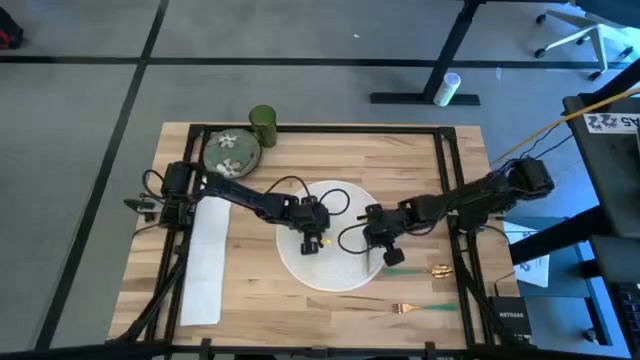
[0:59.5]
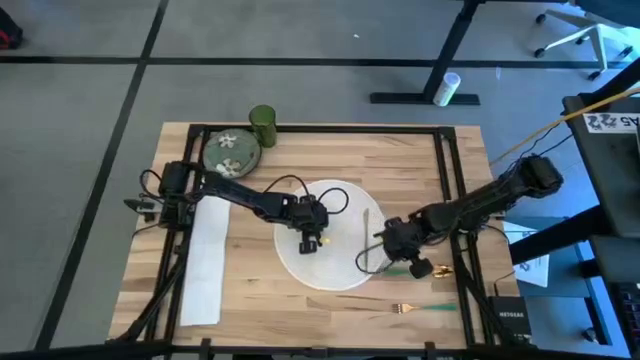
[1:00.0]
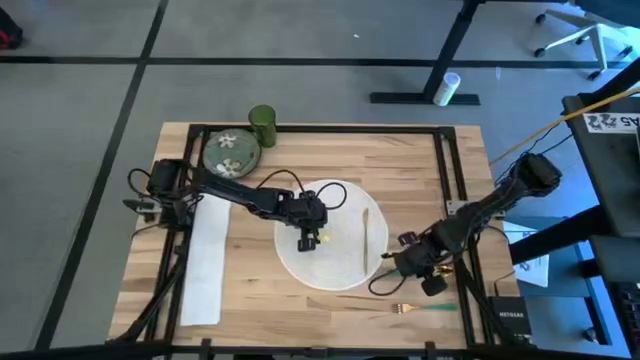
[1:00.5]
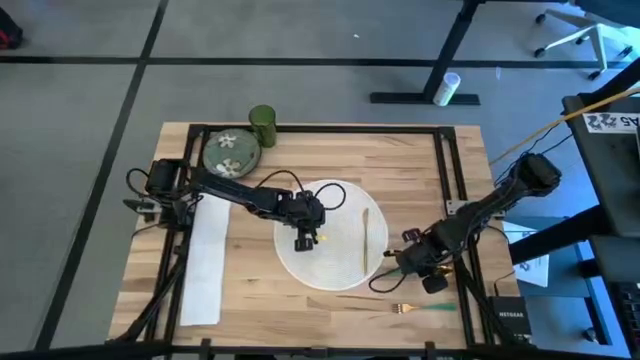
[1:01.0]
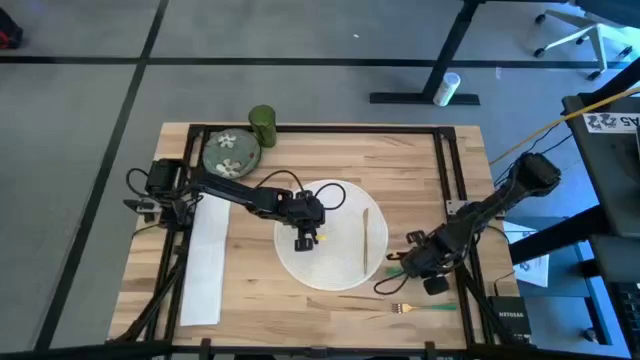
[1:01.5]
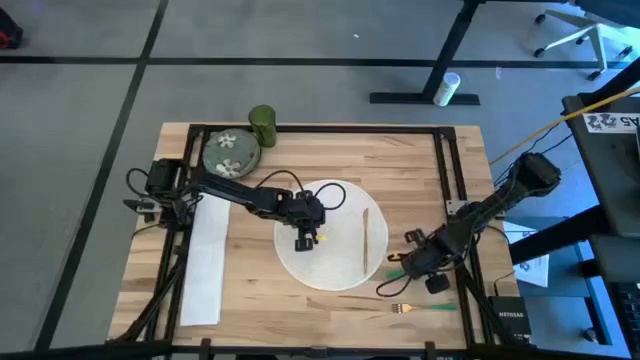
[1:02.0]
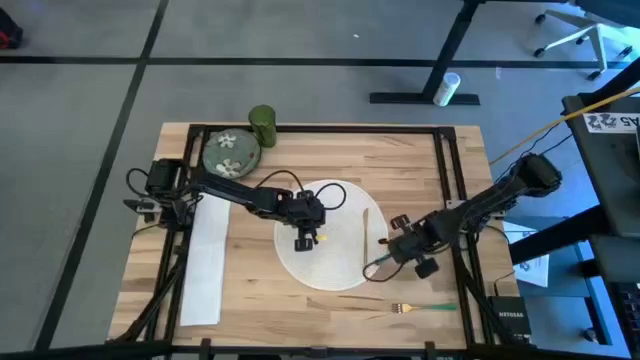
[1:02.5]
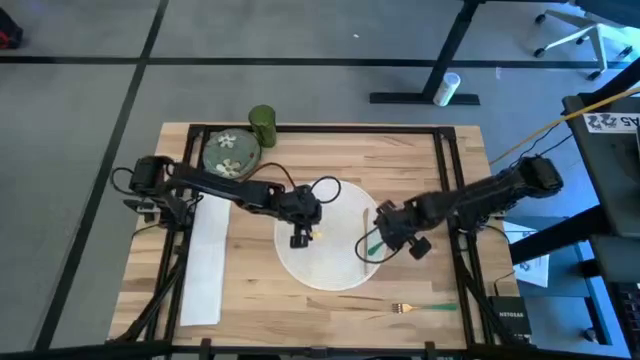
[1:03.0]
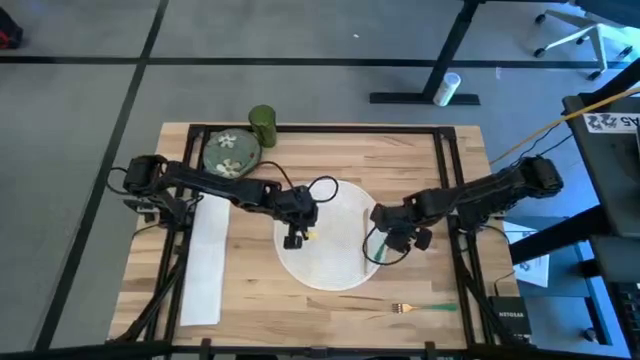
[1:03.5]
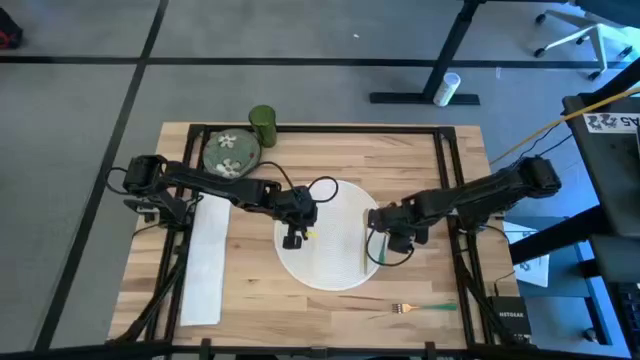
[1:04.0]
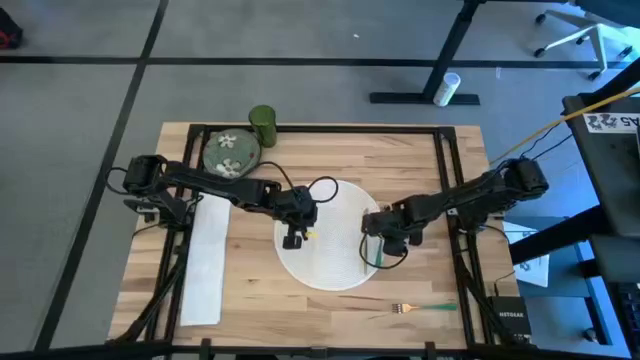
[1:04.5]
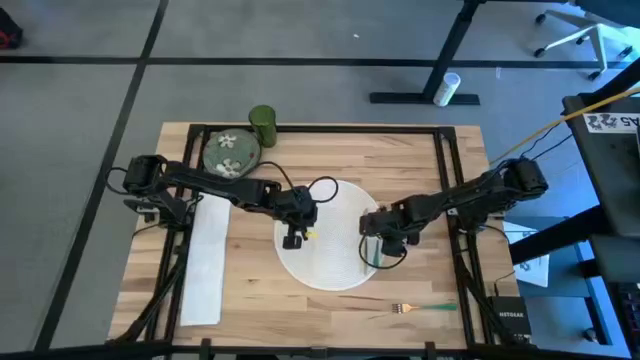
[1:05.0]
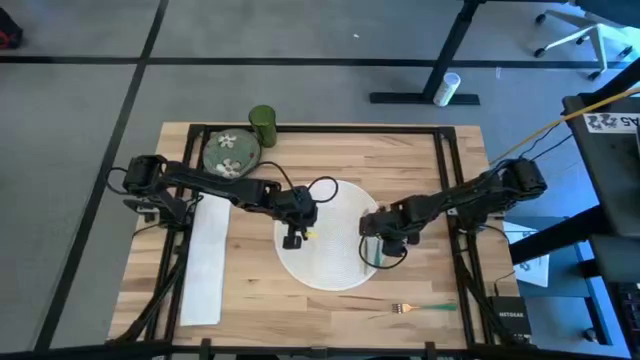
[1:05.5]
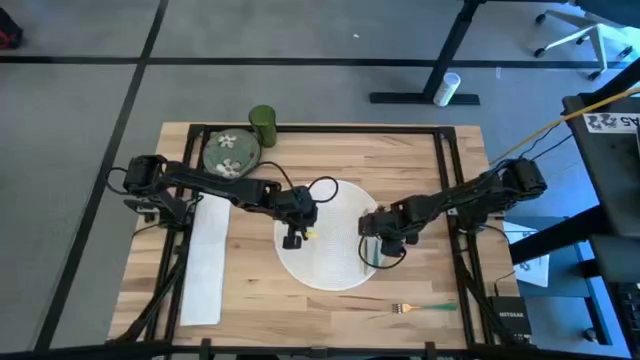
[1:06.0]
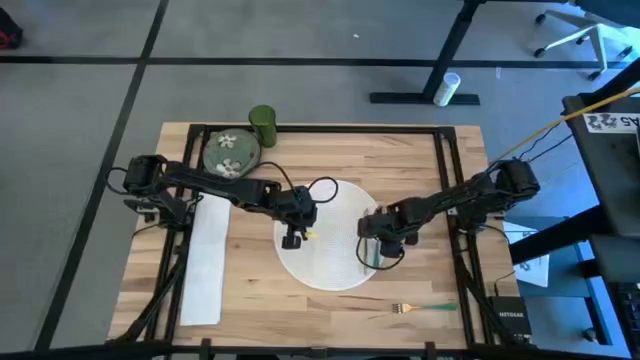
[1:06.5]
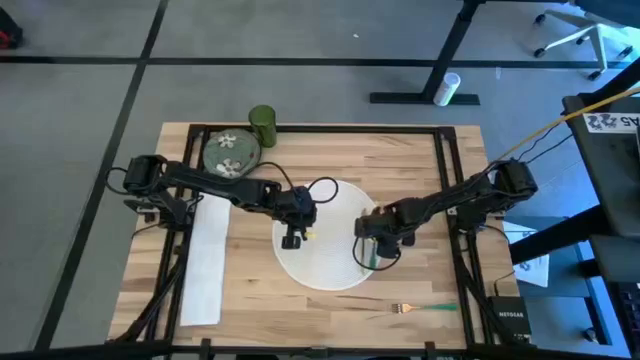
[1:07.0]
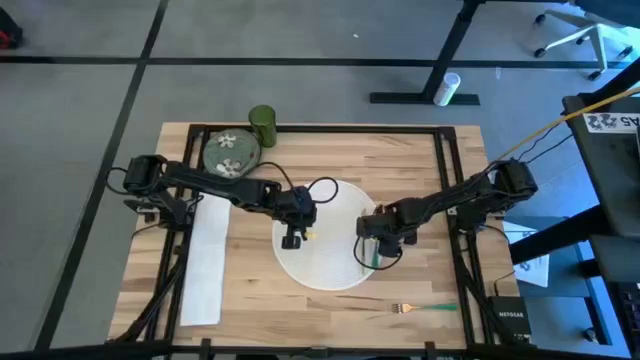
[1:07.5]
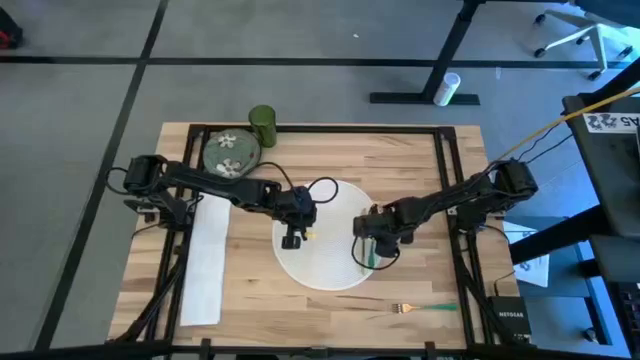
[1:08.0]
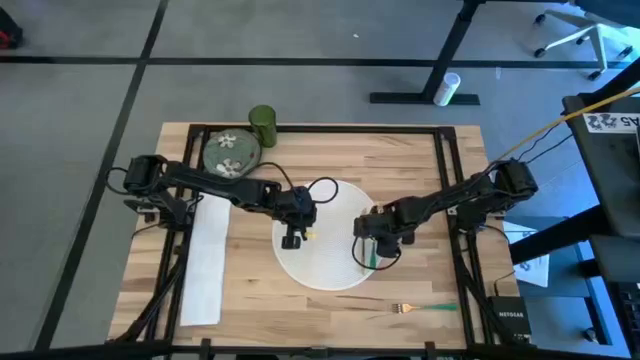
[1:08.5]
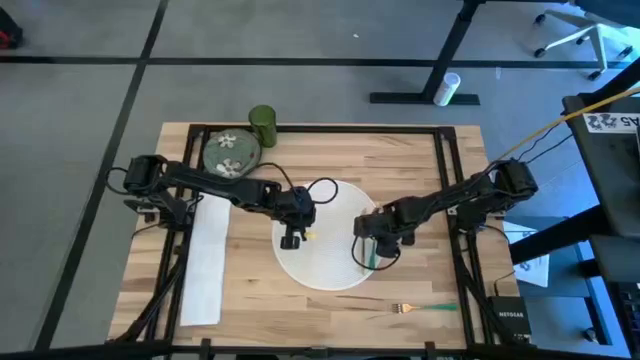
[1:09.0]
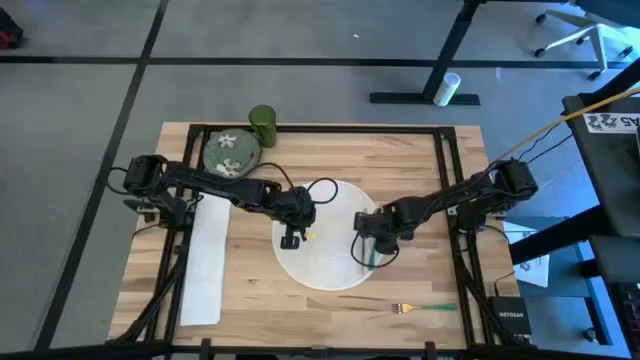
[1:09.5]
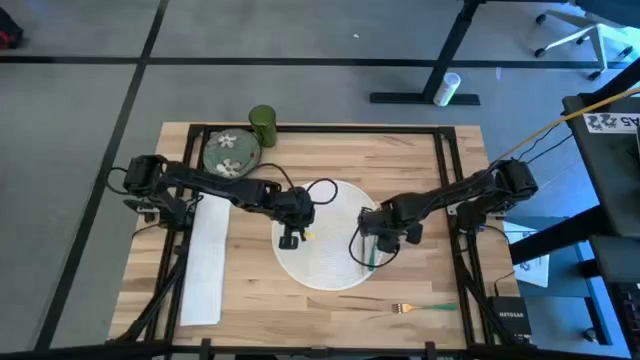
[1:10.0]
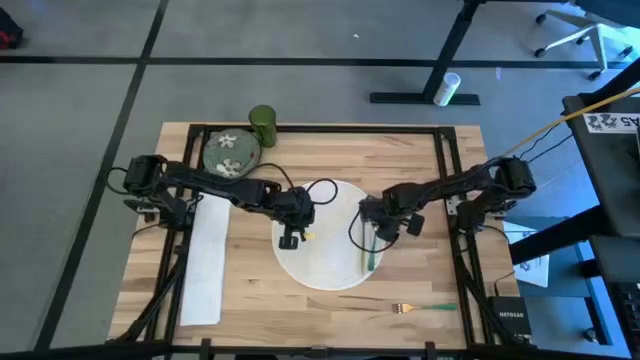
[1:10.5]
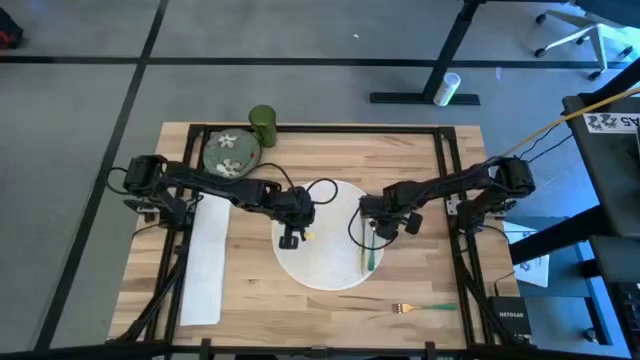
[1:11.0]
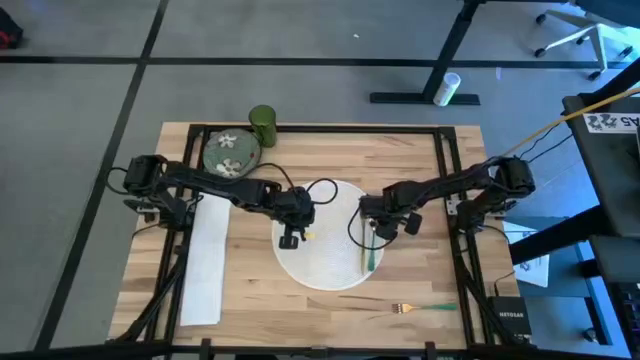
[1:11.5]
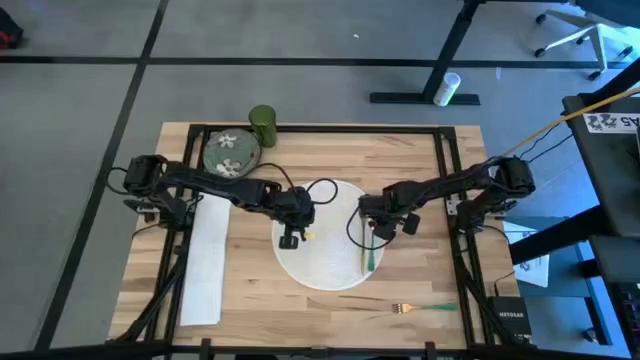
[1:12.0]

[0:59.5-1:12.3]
Task: Set table place
Put the green spoon on the white table mat to the right of the gold table knife

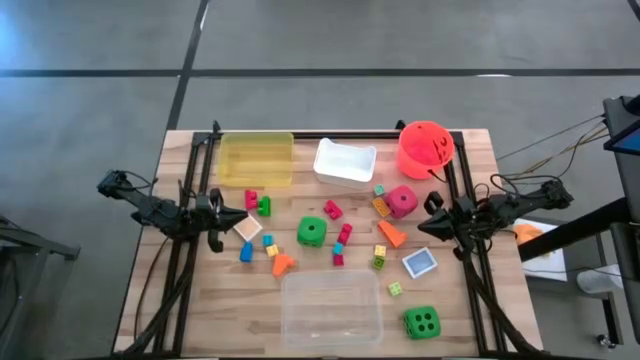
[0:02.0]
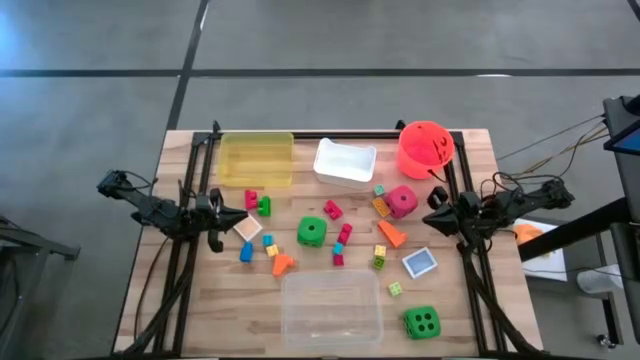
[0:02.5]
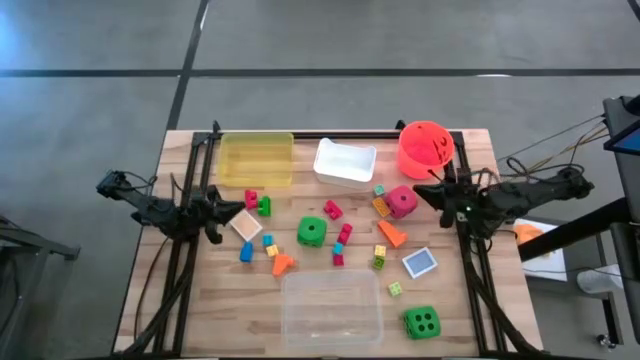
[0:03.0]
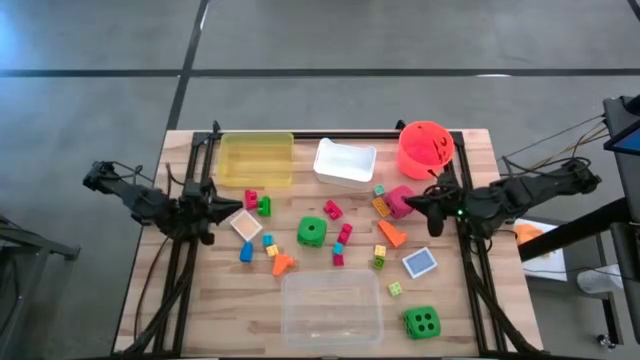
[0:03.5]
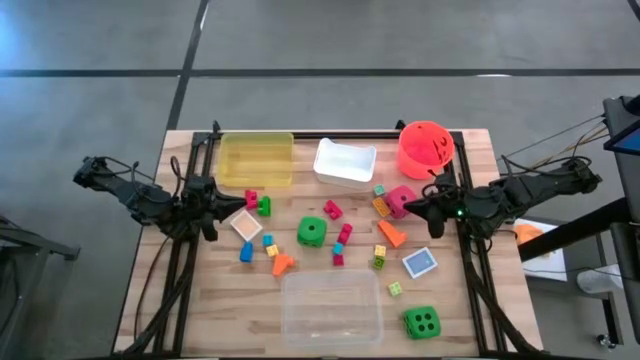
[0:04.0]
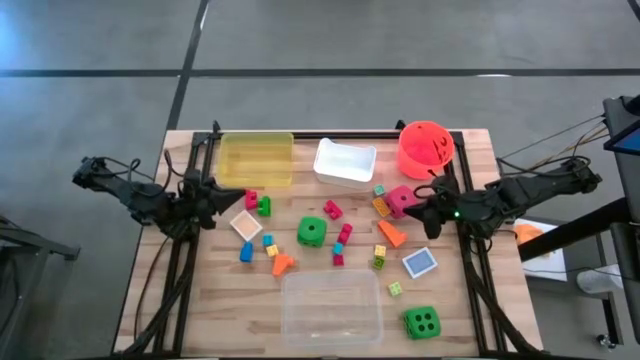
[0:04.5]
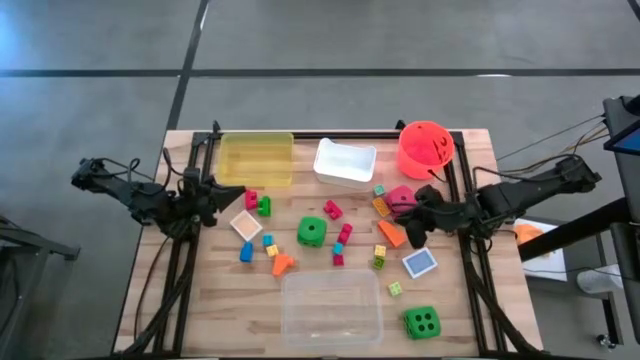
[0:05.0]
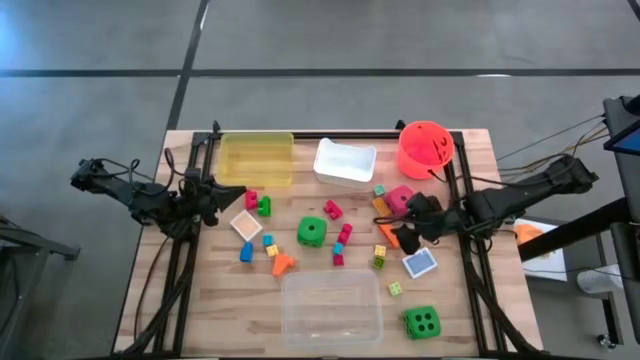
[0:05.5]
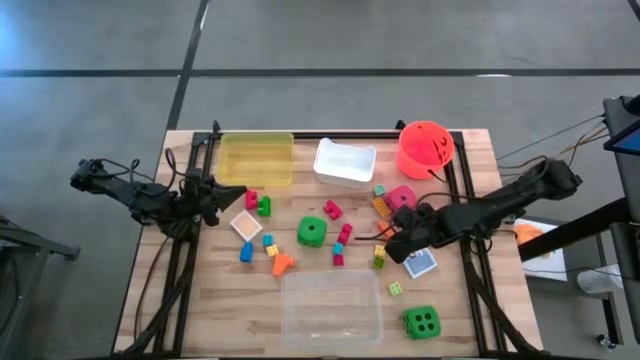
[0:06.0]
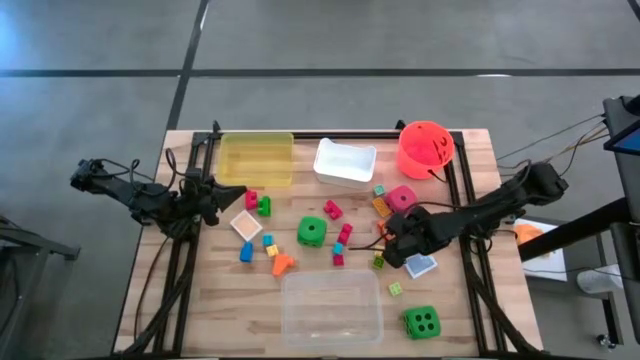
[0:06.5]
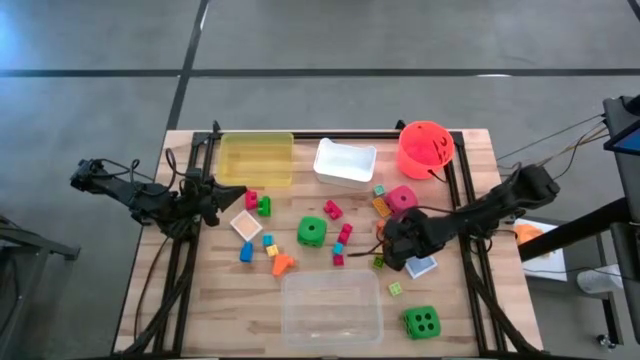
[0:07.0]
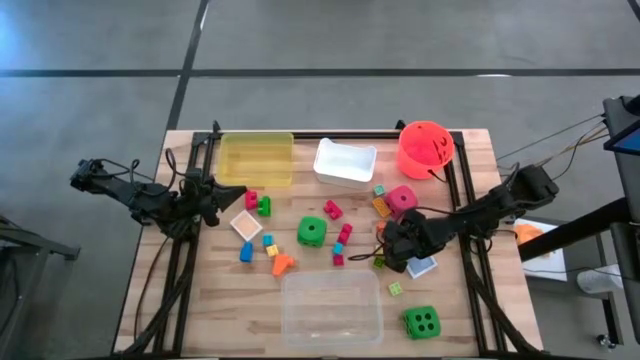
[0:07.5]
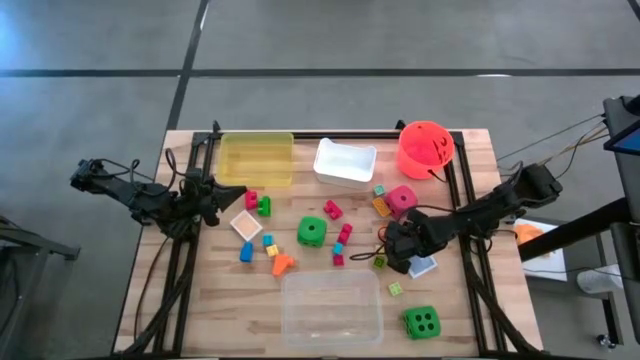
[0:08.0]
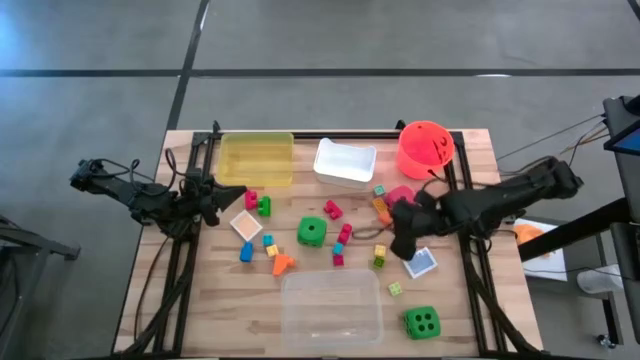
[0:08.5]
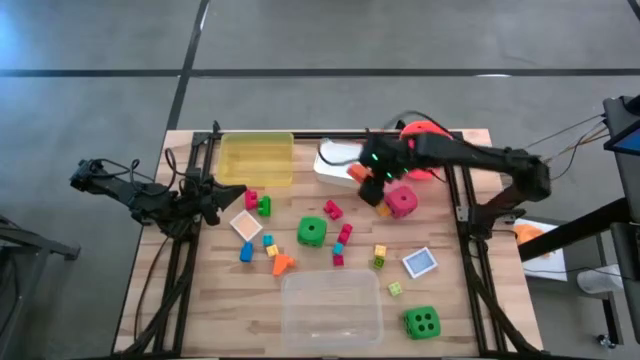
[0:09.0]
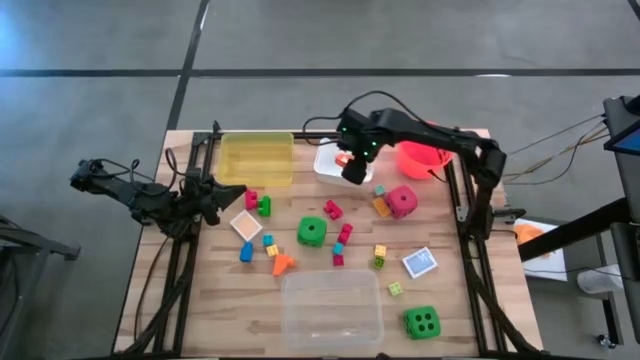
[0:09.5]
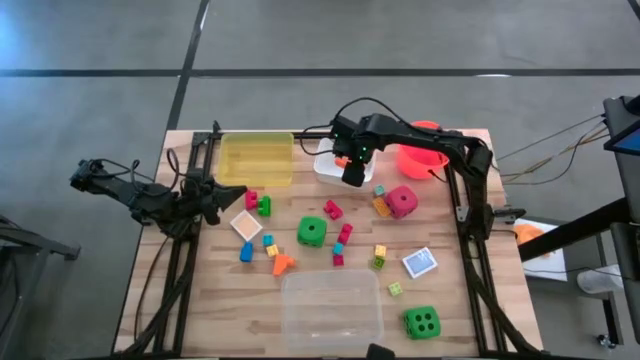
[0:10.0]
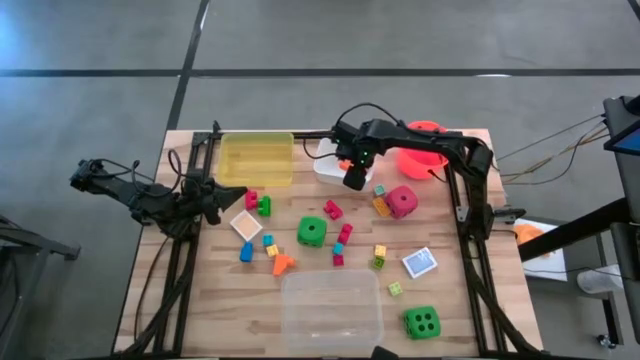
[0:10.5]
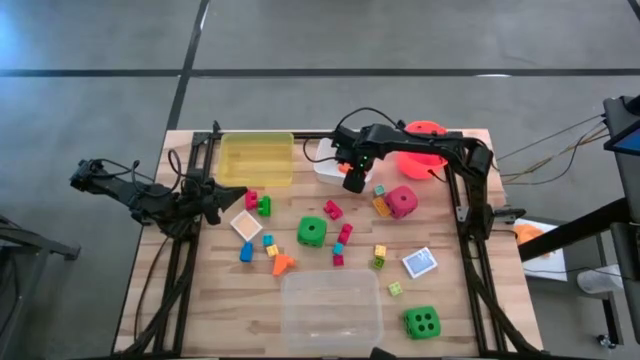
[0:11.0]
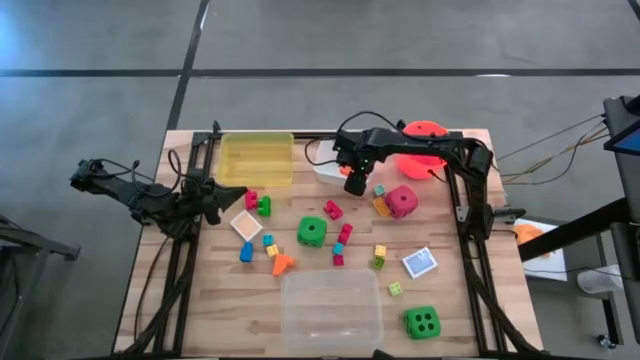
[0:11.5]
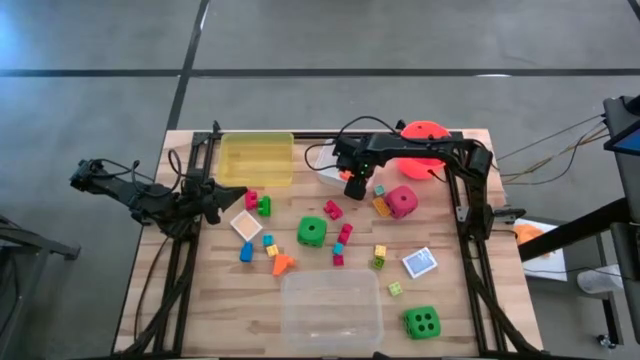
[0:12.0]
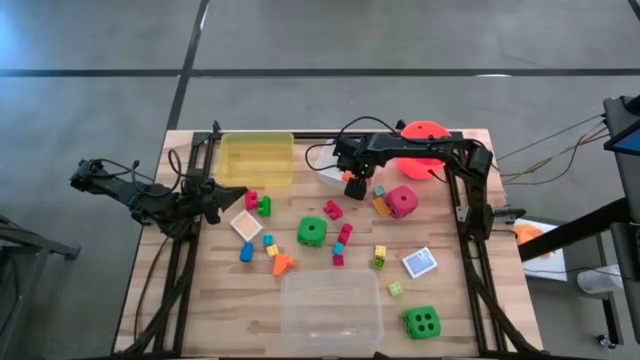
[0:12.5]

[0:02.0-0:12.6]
Task: Pick & Place Toys
Put the orange game piece into the white bin
